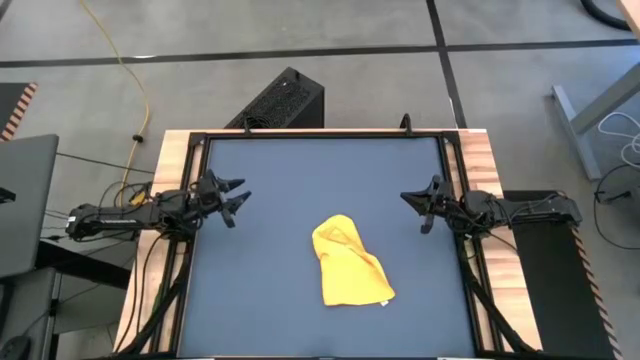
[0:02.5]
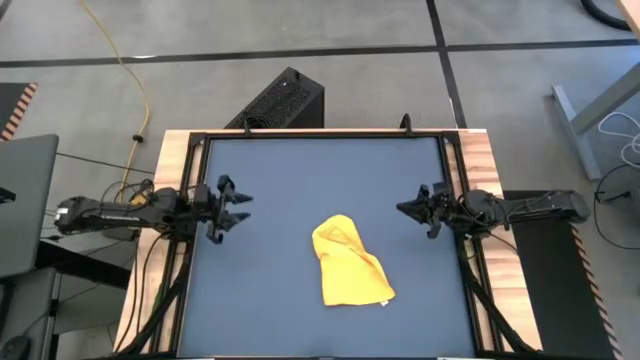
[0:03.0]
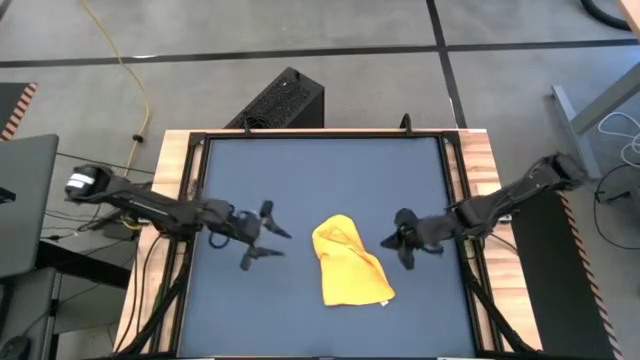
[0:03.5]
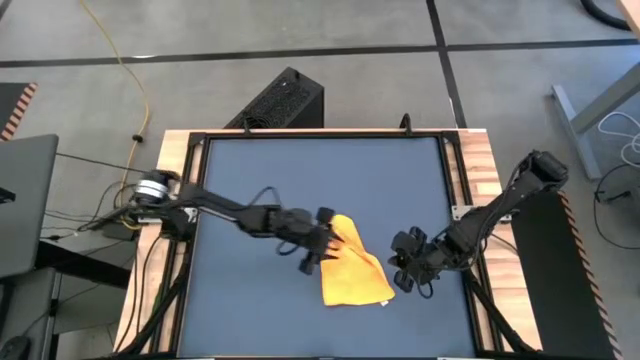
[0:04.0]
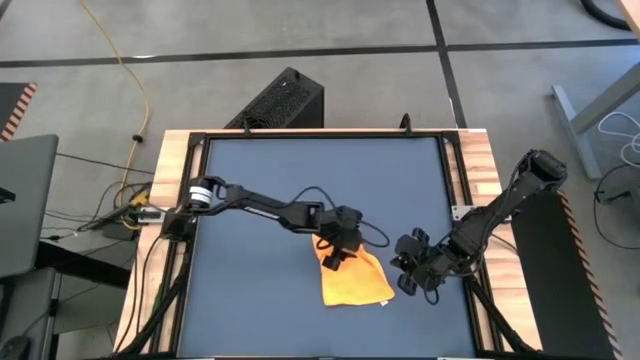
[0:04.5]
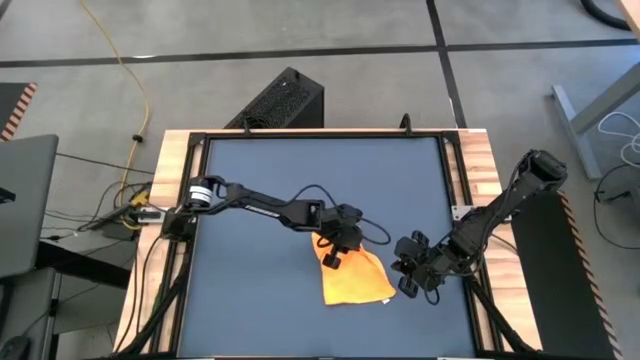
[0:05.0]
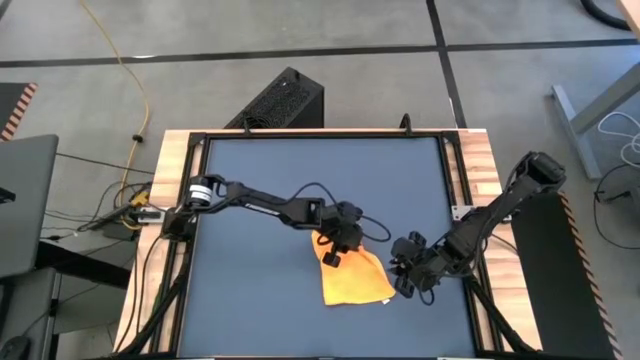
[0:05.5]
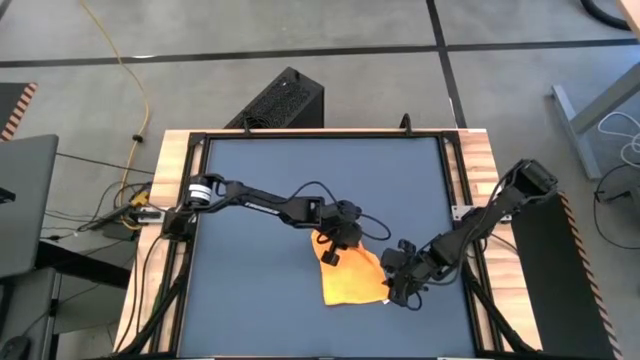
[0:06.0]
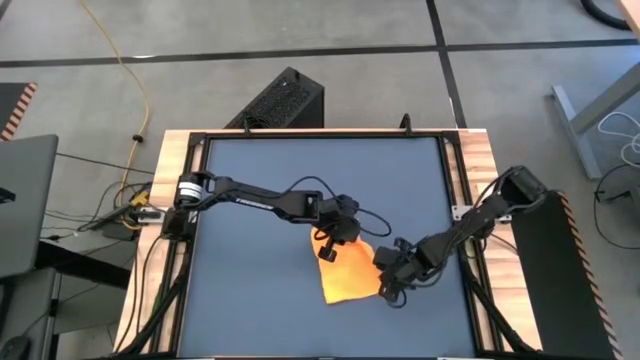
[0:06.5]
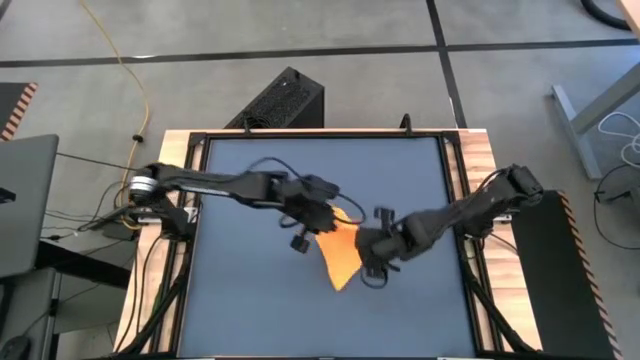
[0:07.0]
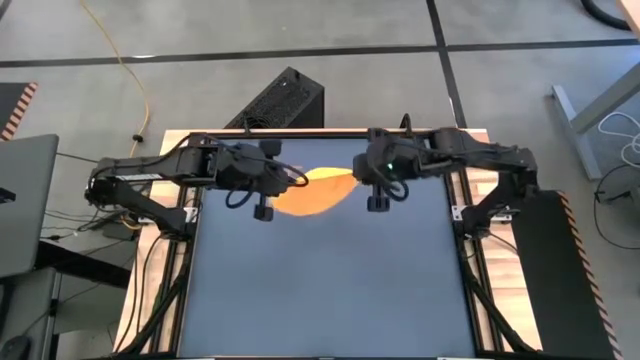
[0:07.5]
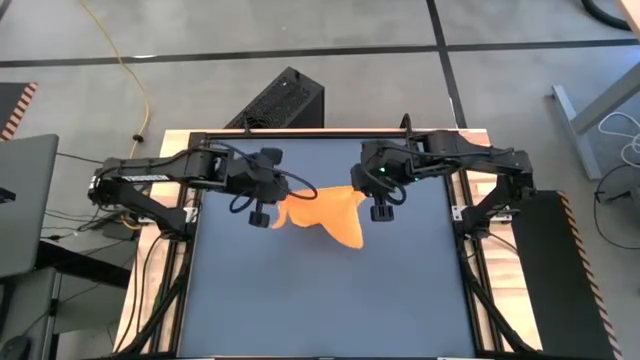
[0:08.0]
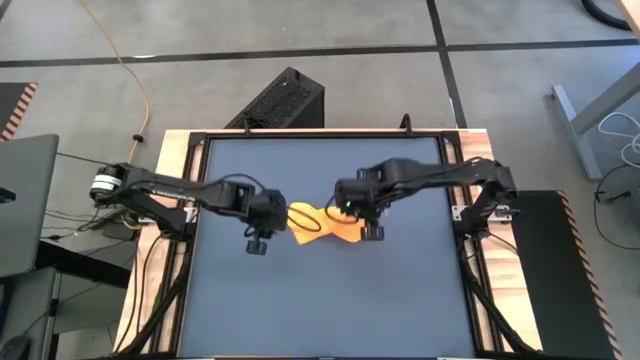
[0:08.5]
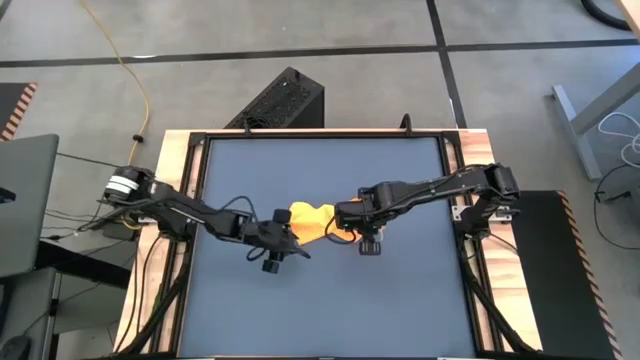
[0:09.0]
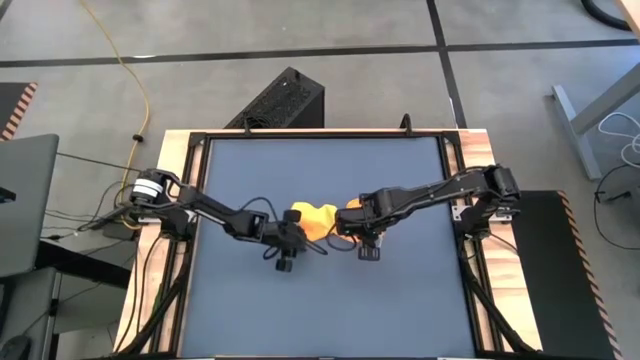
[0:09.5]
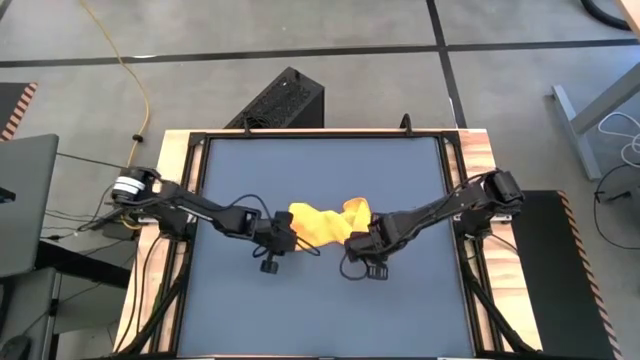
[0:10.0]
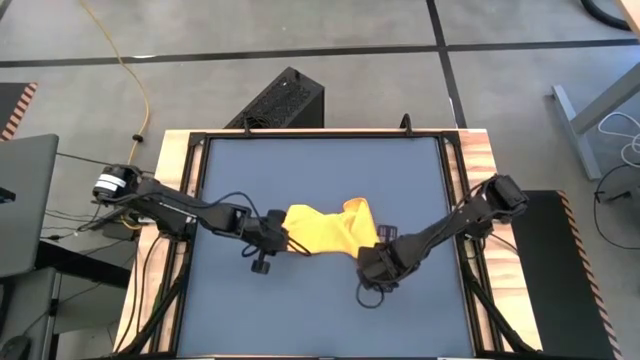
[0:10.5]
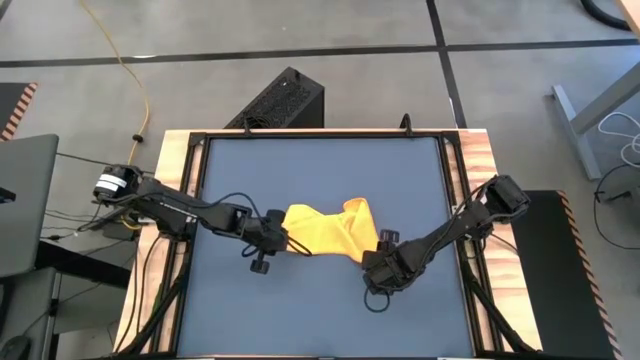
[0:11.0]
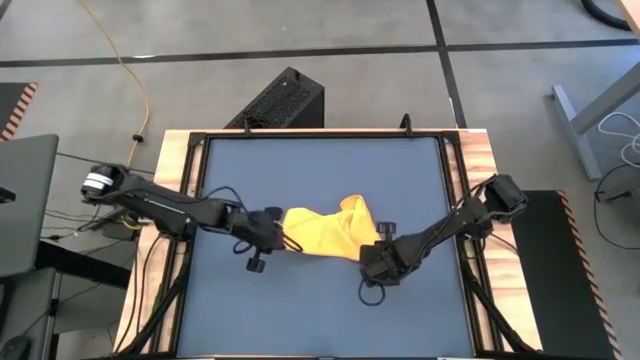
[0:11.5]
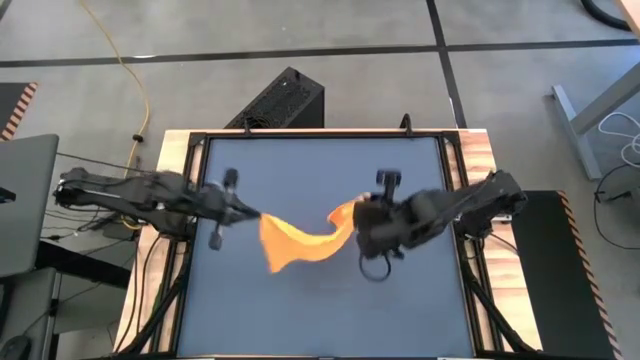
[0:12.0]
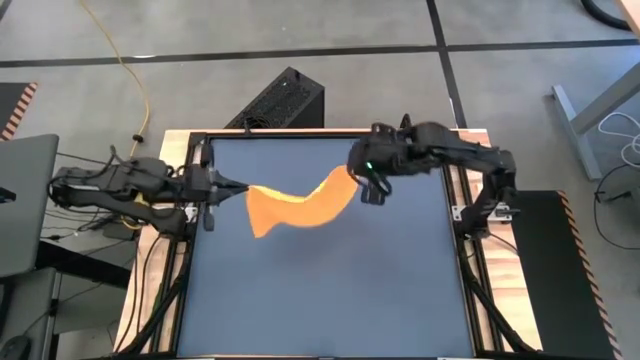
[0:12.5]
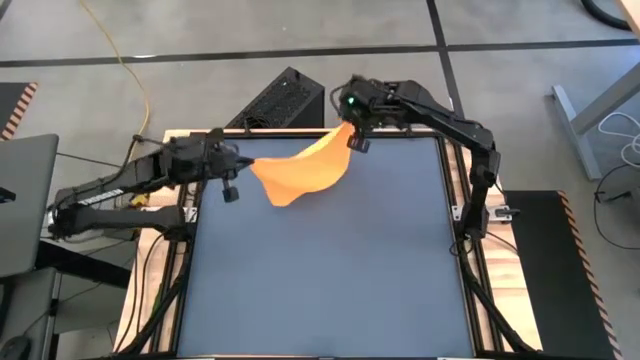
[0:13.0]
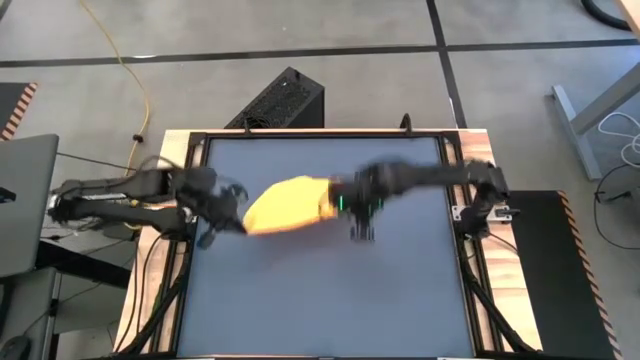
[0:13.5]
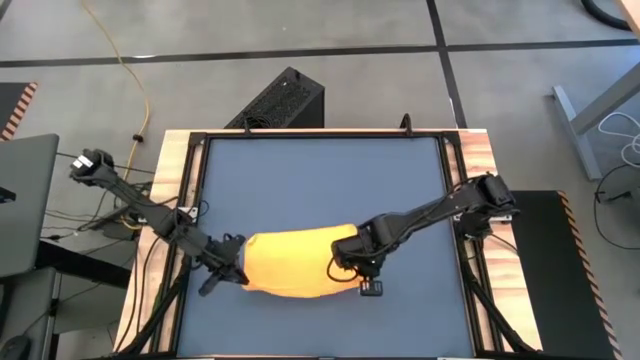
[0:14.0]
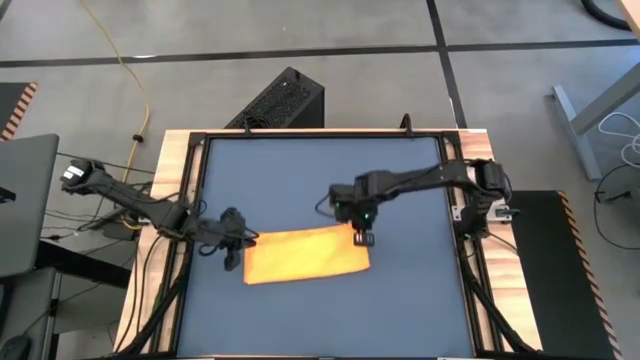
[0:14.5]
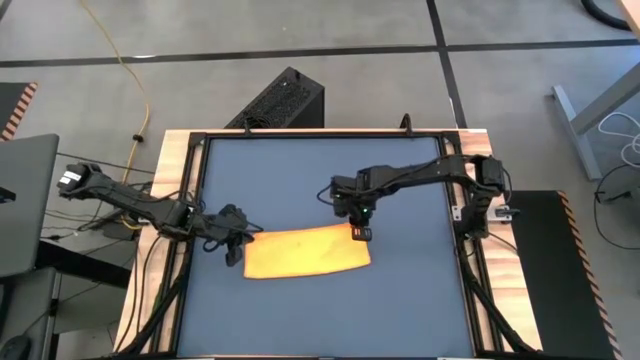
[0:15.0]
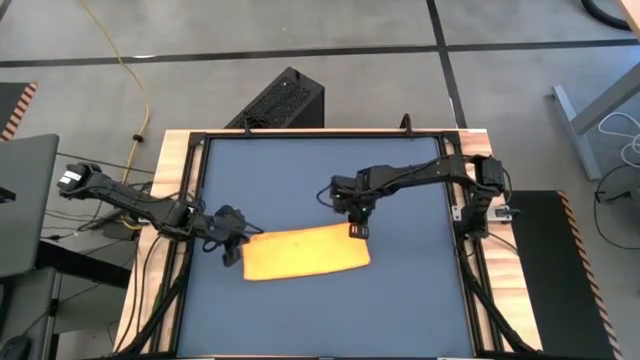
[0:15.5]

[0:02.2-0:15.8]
Task: Roll towel
Fold the orange microfiber towel

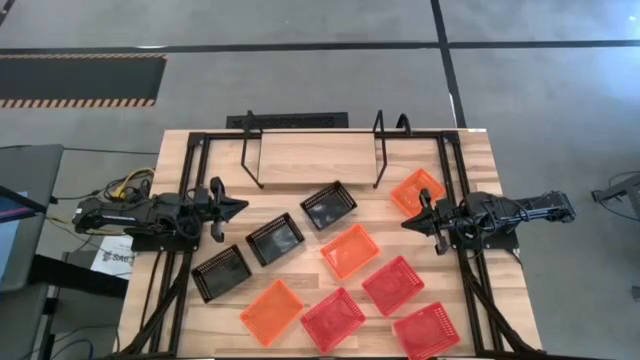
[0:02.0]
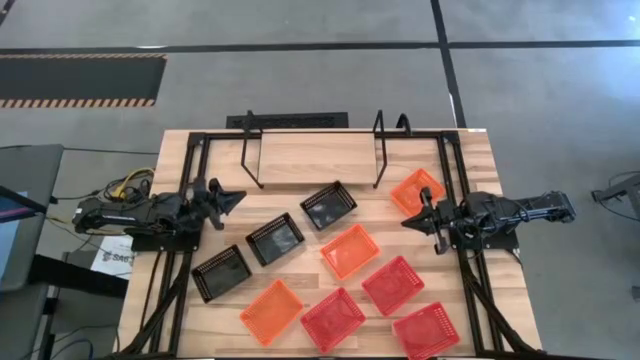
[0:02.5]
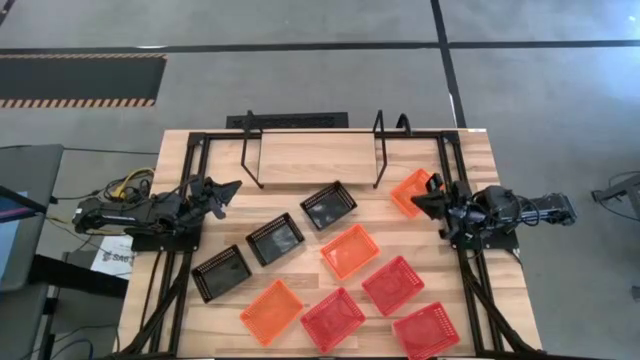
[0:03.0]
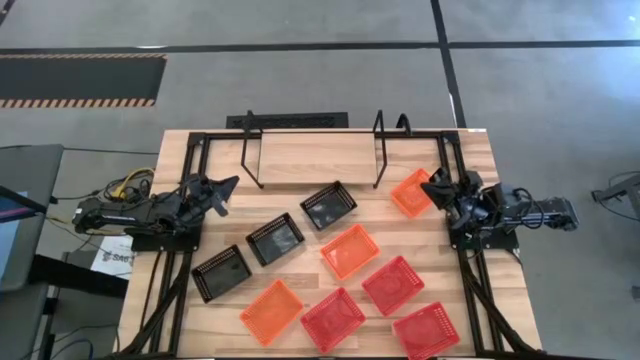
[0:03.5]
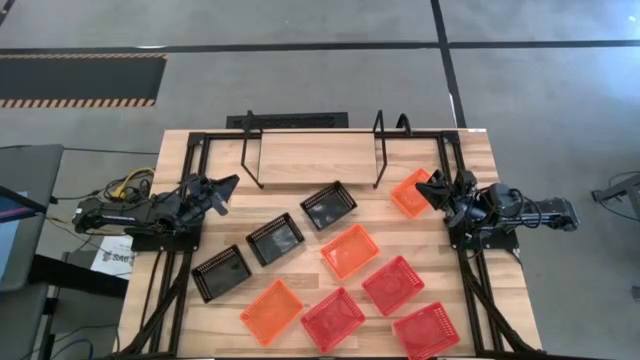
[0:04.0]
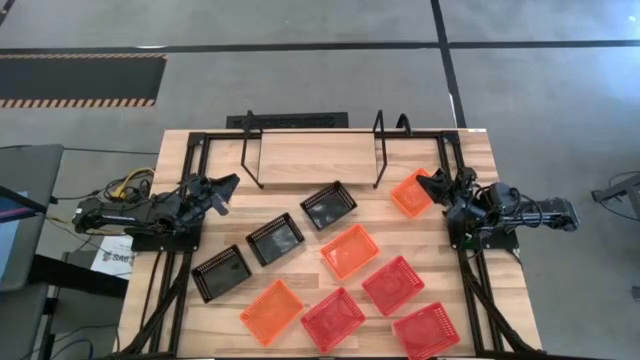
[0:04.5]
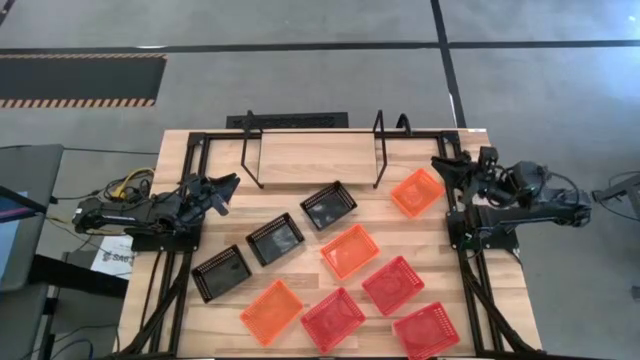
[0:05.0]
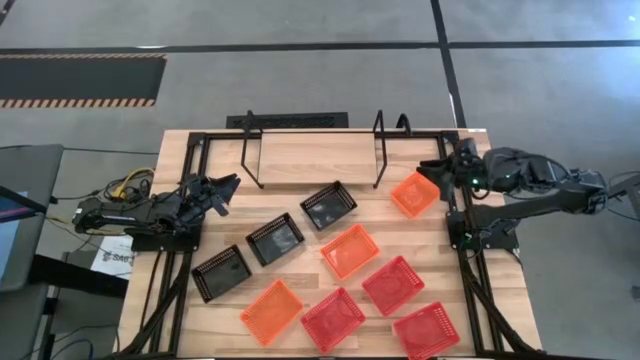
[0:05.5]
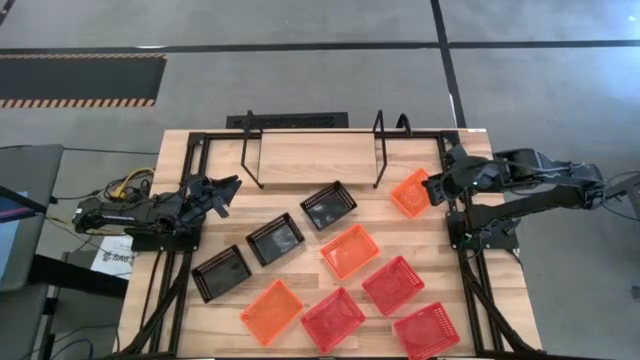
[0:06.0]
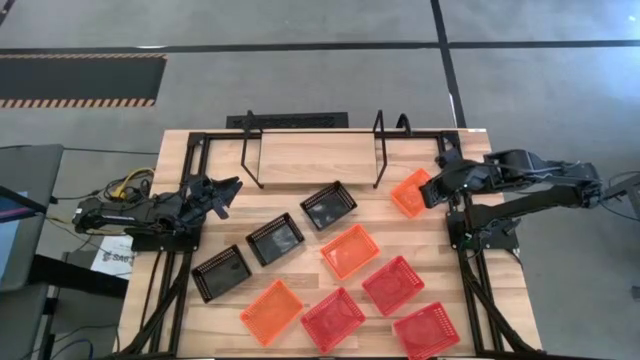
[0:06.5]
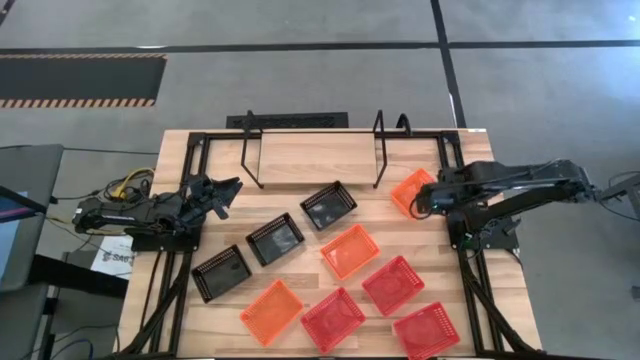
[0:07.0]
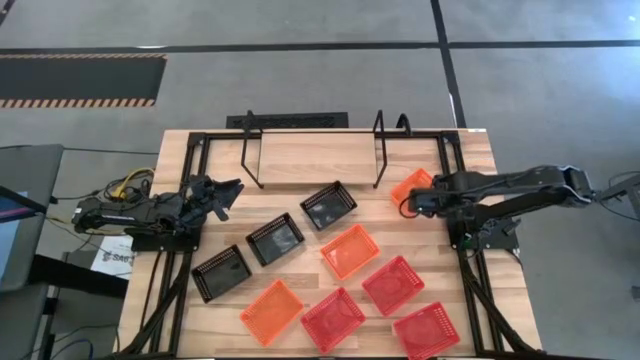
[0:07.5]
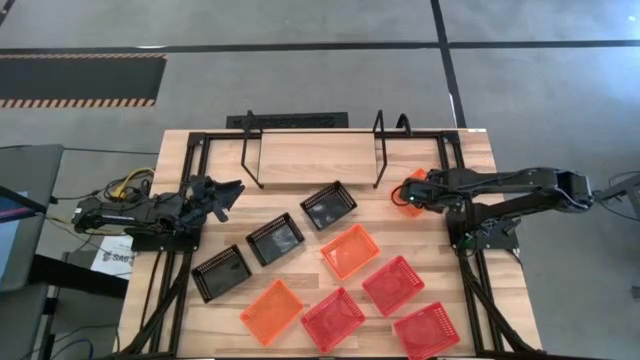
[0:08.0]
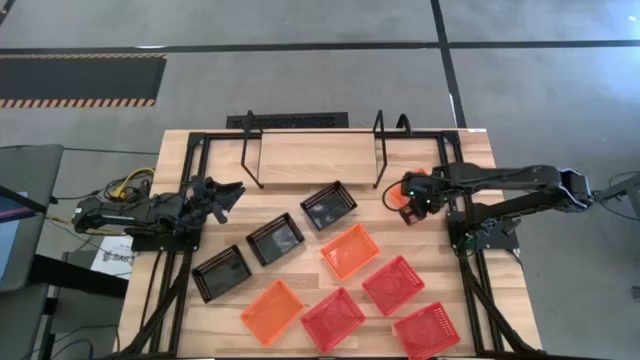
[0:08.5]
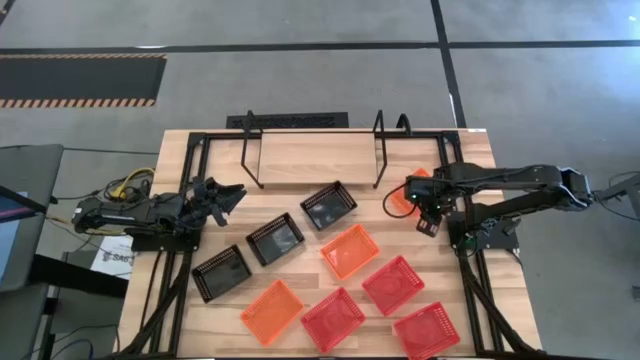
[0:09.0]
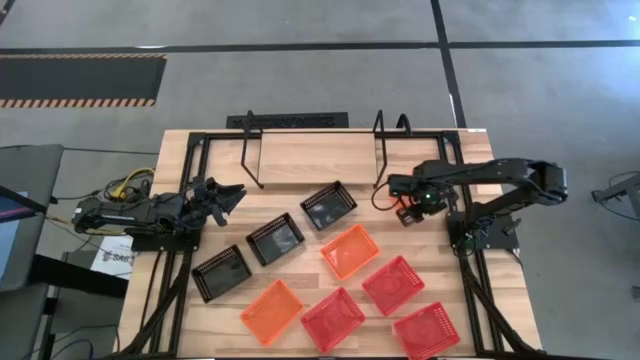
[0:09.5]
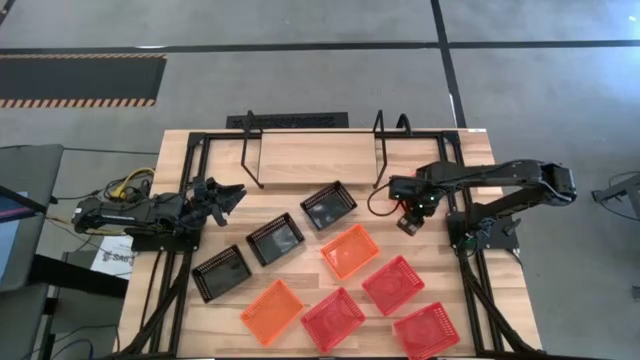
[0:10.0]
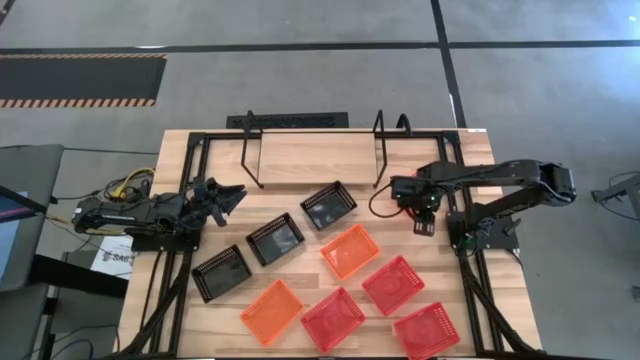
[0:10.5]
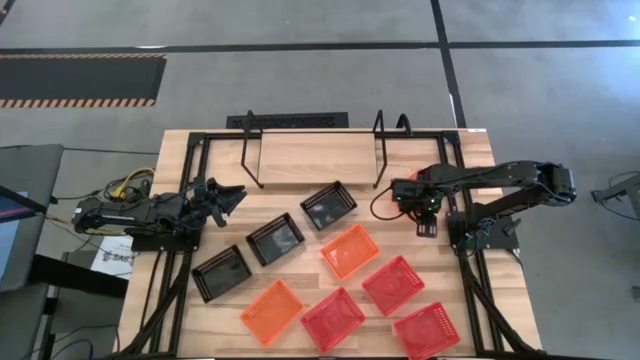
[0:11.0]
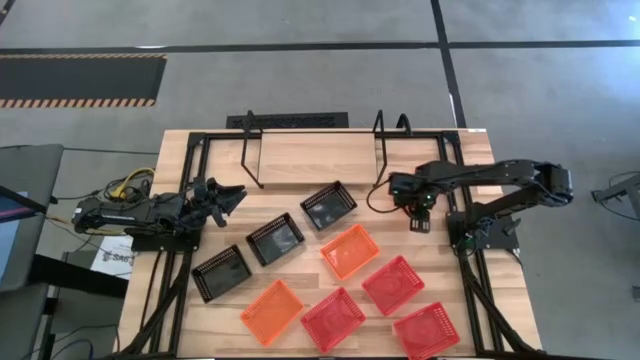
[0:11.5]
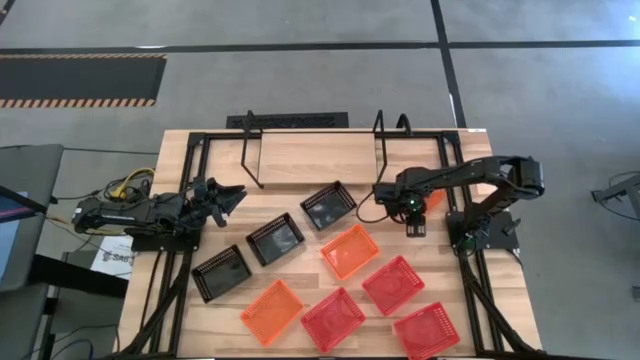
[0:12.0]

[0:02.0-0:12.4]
Task: Stack baskets on shelf by color
Put the top orange bin on the shelf
